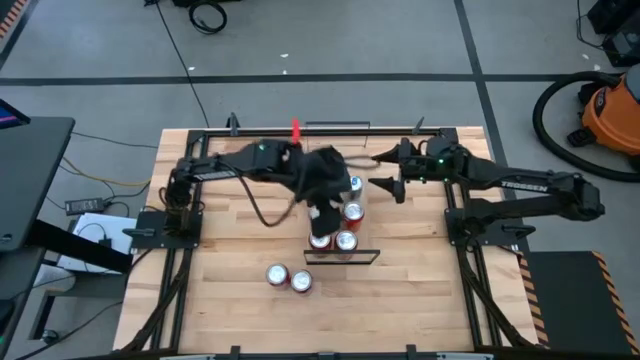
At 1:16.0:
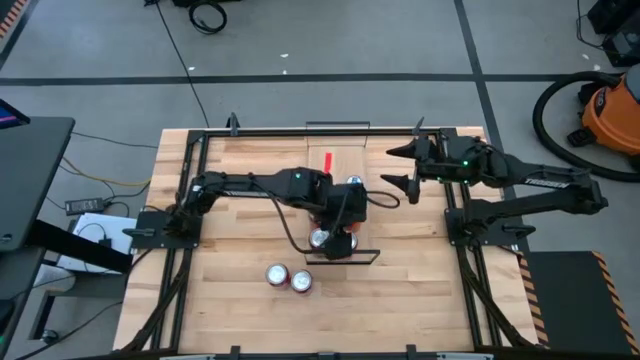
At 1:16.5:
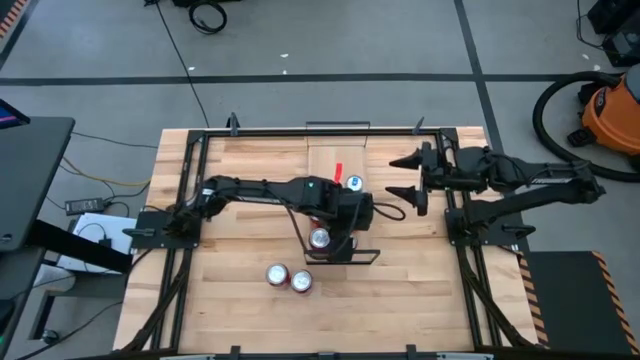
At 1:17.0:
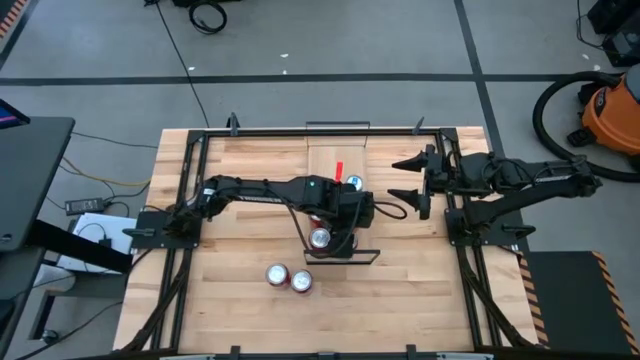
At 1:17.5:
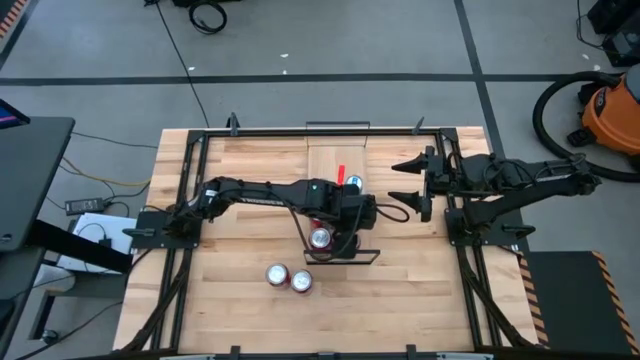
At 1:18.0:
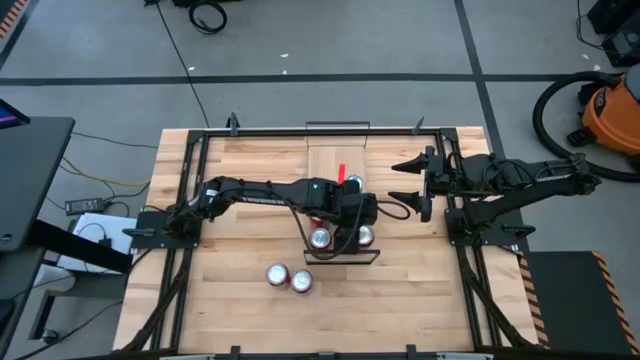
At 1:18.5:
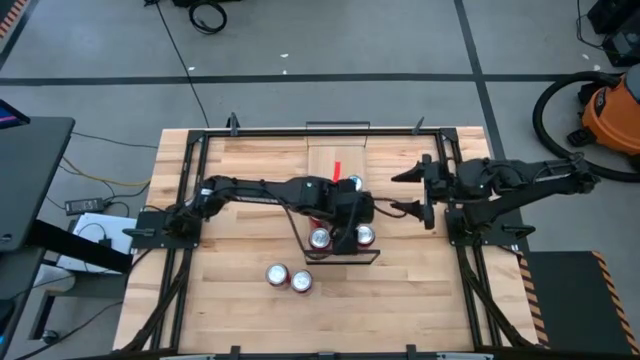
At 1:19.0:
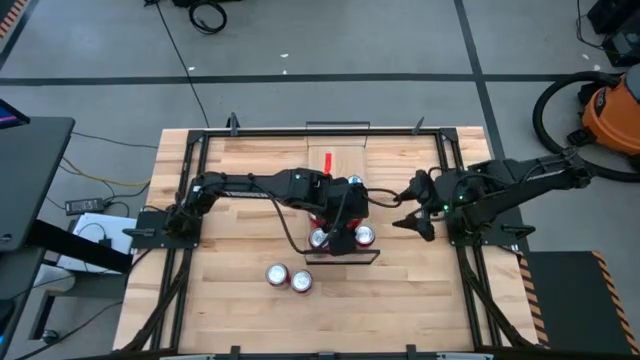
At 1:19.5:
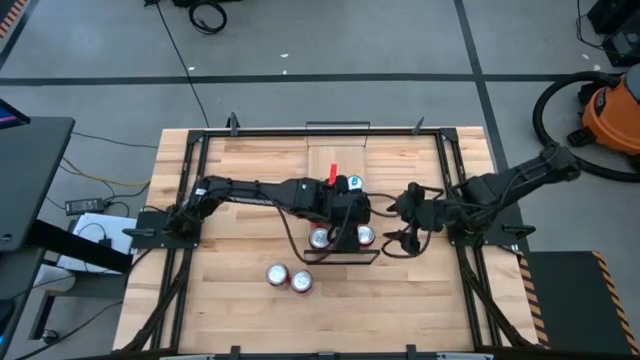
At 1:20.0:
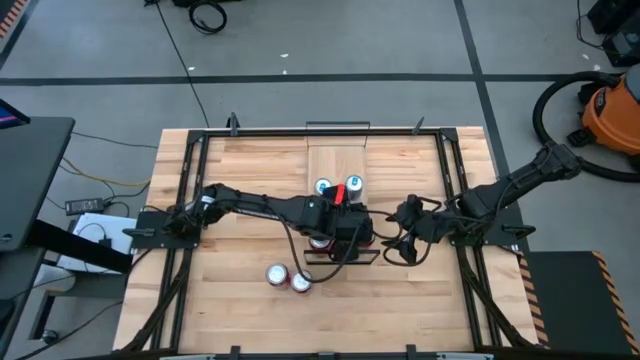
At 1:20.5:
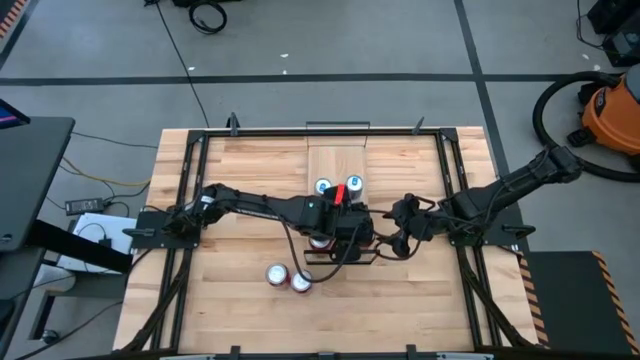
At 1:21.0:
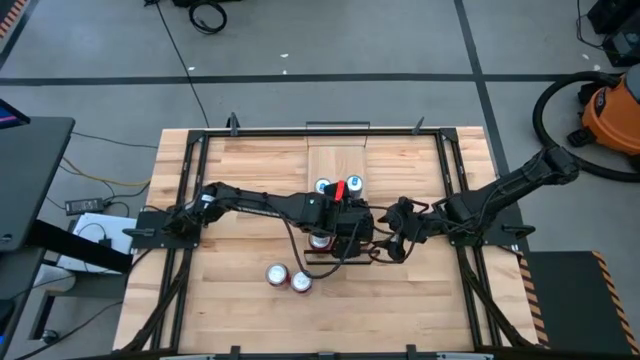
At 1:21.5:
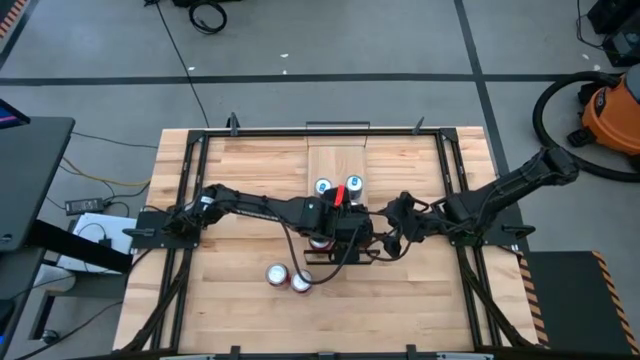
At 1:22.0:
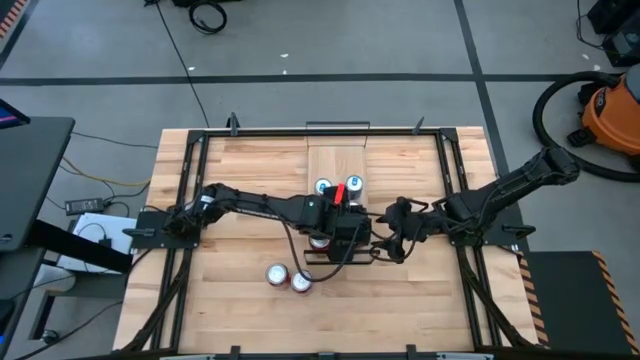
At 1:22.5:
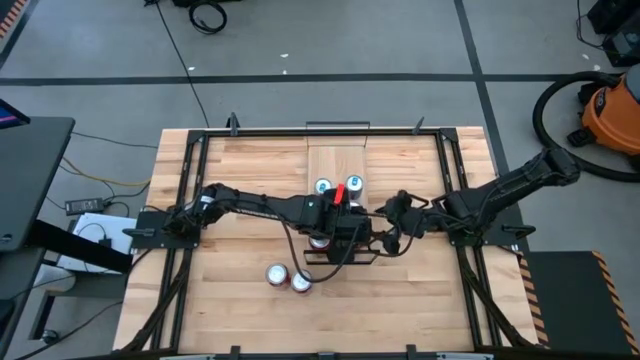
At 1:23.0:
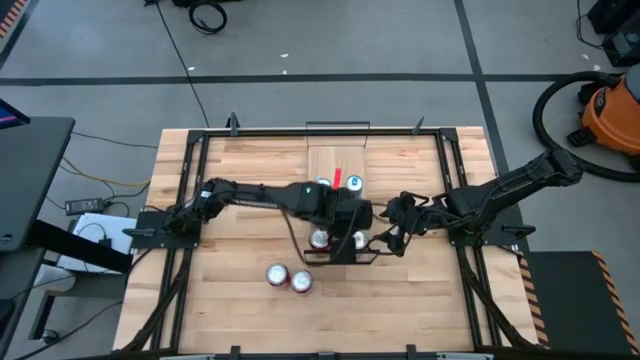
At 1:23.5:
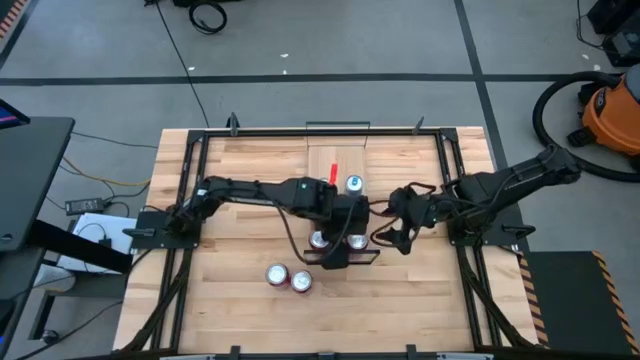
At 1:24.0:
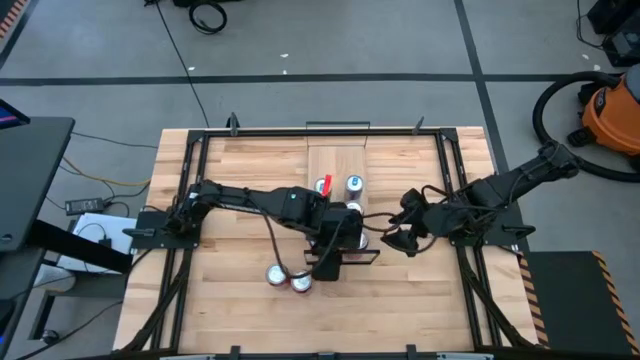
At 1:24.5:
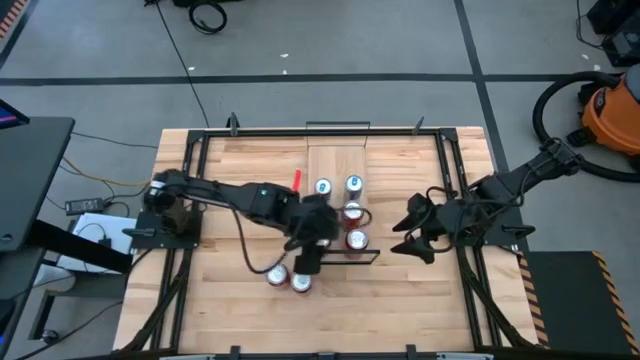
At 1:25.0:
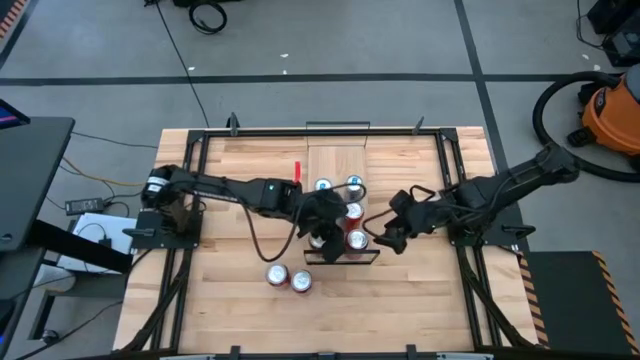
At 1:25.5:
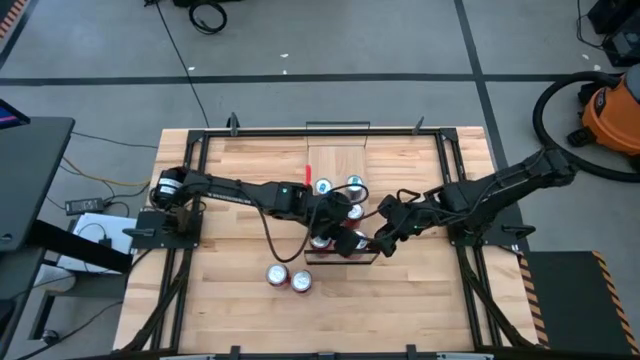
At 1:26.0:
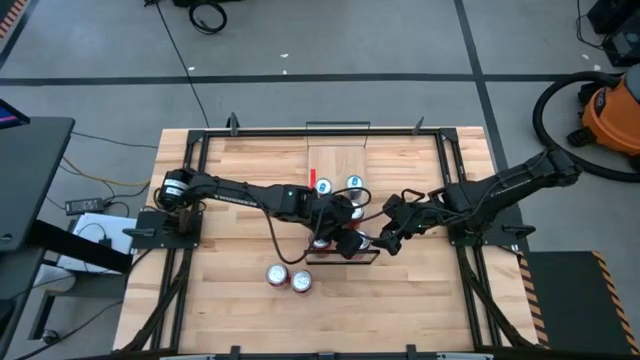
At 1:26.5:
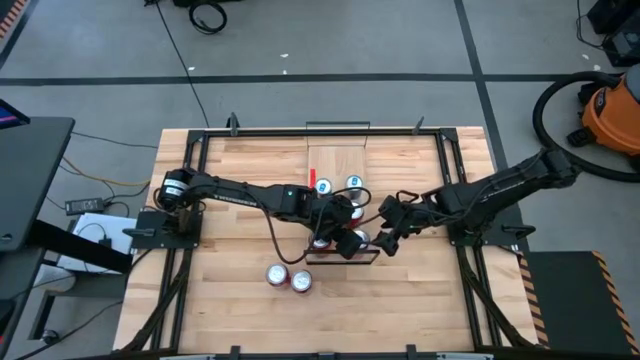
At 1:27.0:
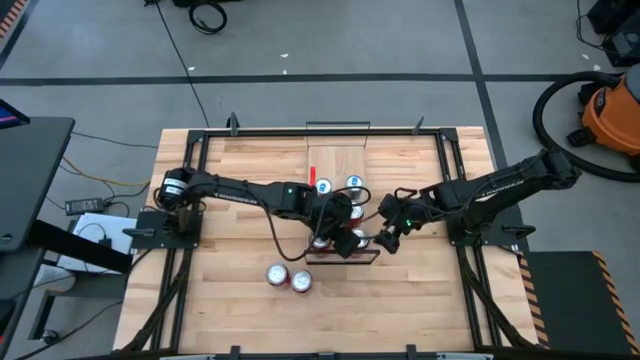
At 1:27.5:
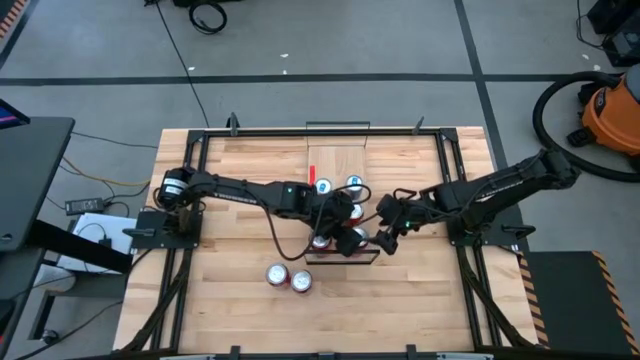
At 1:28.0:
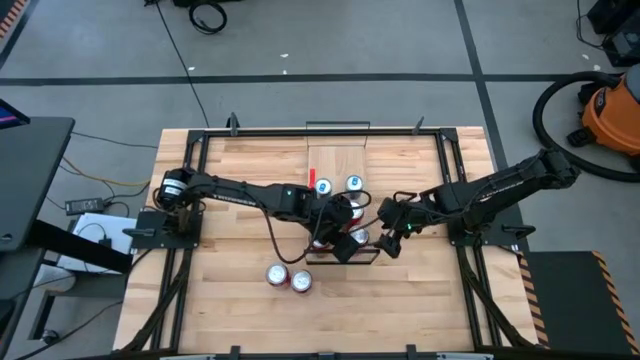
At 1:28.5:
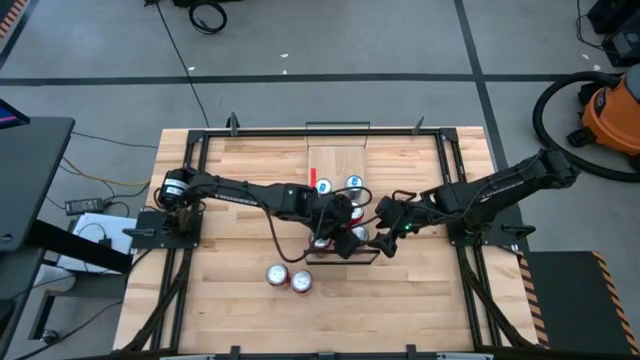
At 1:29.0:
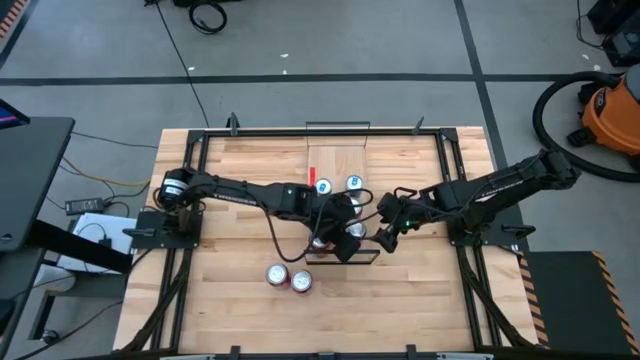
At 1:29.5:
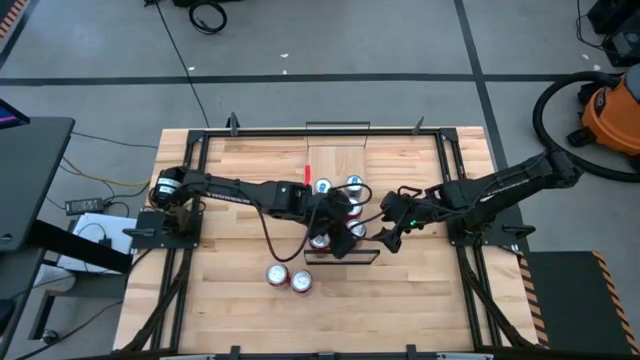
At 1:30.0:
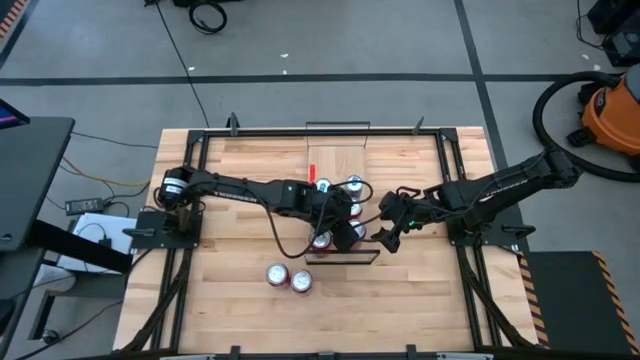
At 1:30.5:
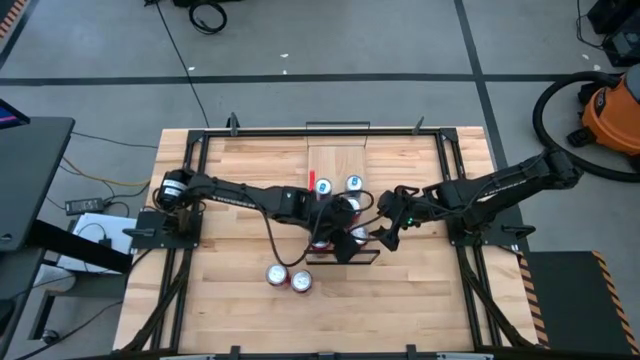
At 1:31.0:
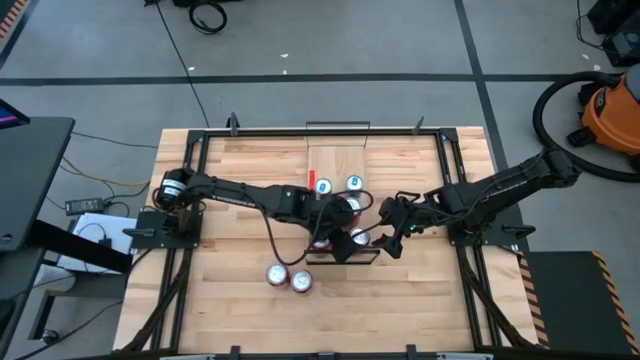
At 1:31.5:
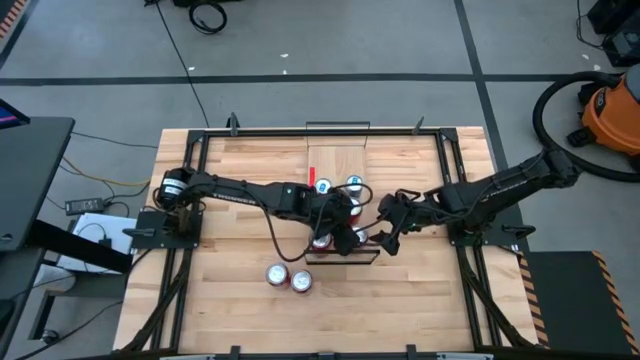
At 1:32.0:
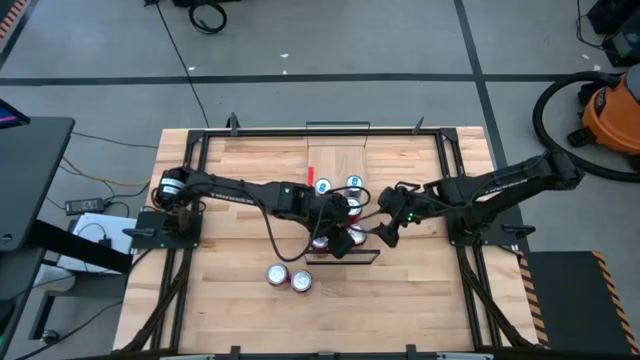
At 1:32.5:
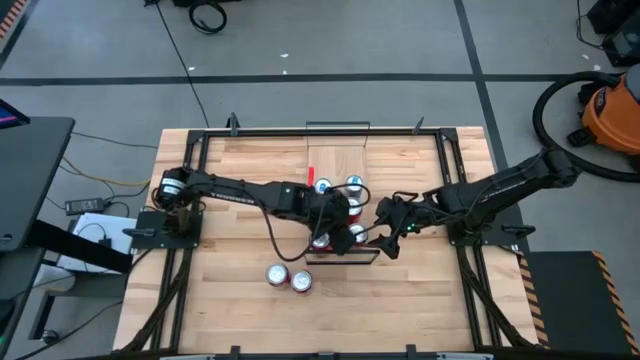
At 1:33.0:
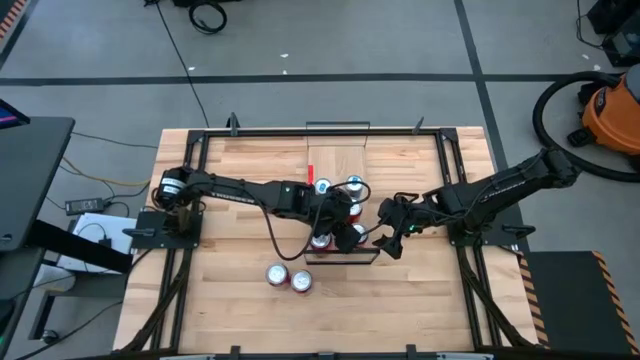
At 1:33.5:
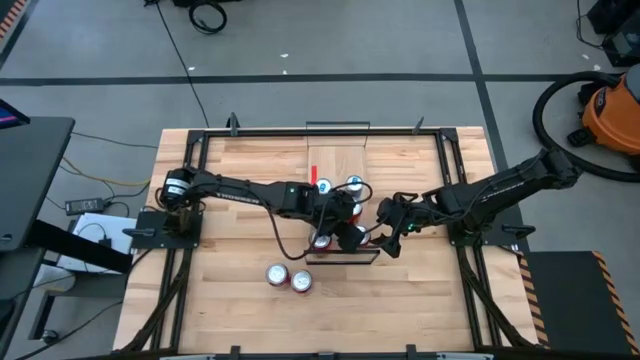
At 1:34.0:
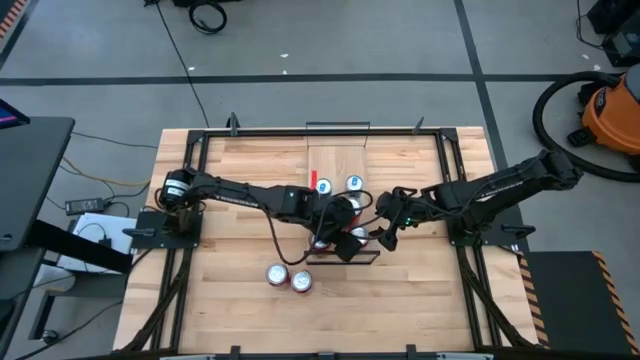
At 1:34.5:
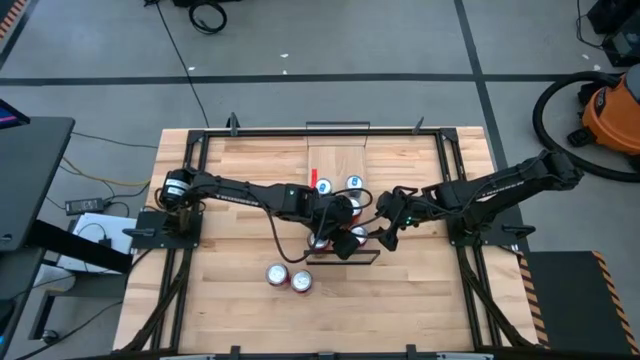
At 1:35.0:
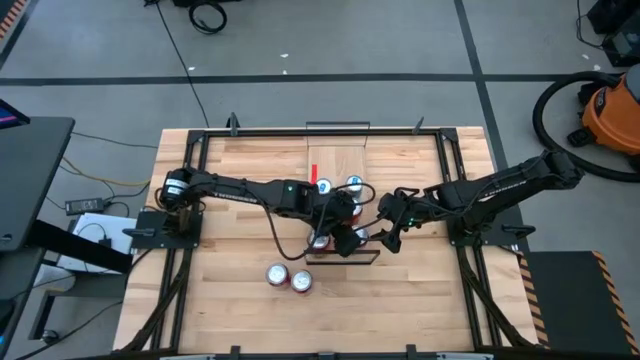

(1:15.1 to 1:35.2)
Task: Place canned beverage on shelf
Adjust the red black soda can on the shelf

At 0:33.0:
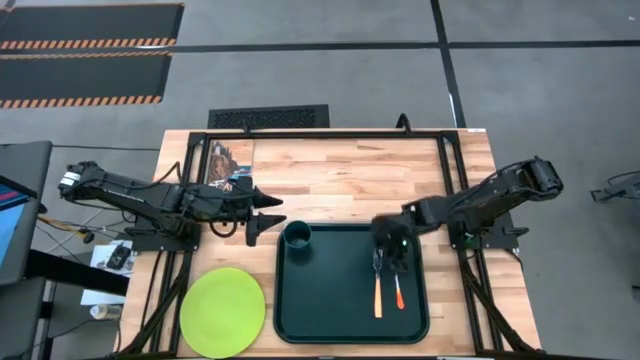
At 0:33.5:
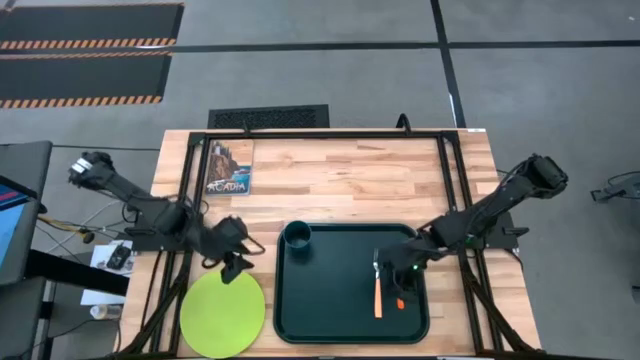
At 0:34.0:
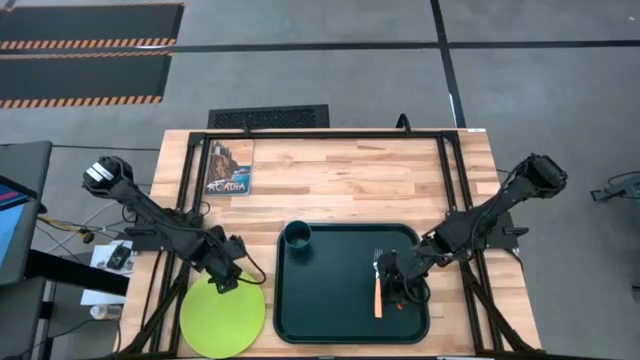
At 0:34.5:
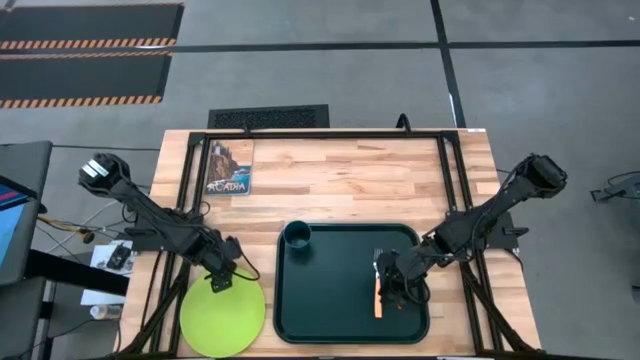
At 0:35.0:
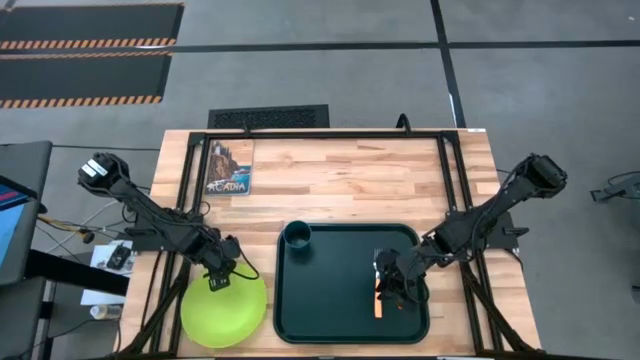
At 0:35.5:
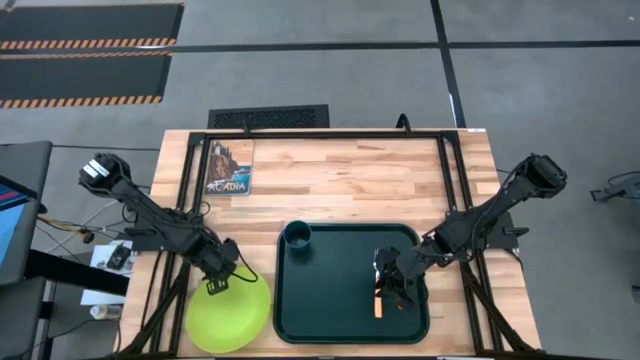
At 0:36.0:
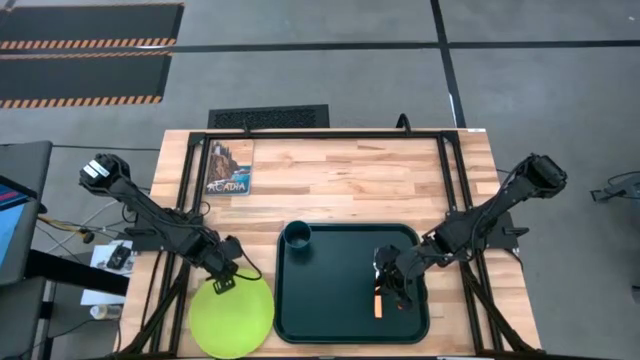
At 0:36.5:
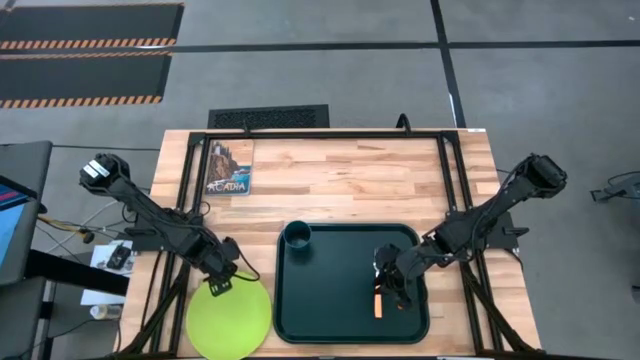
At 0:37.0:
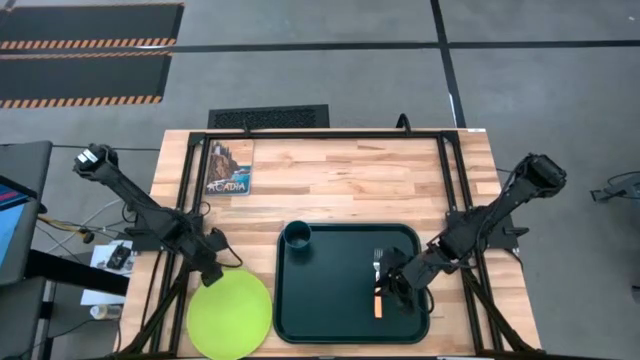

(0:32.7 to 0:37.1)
Task: Pick and place plate/cup/fork/spoon on tray
Put the light green plate on the black tray to the left of the light orange fork
